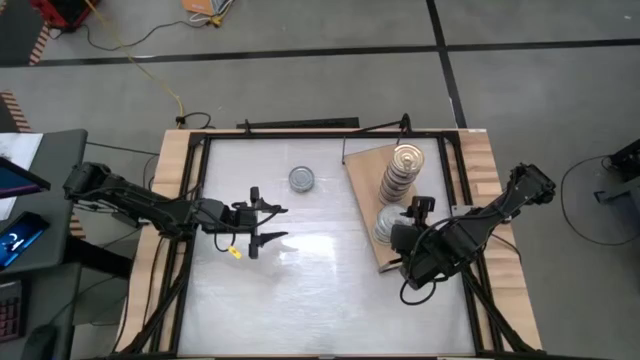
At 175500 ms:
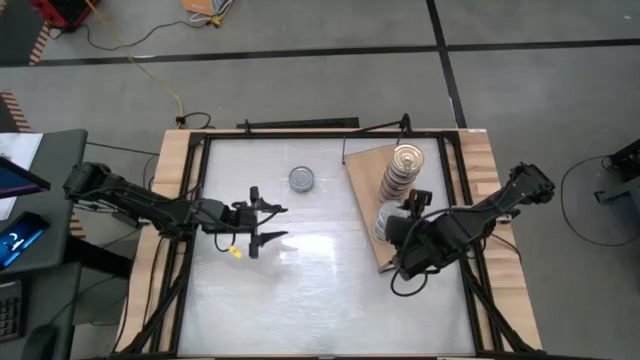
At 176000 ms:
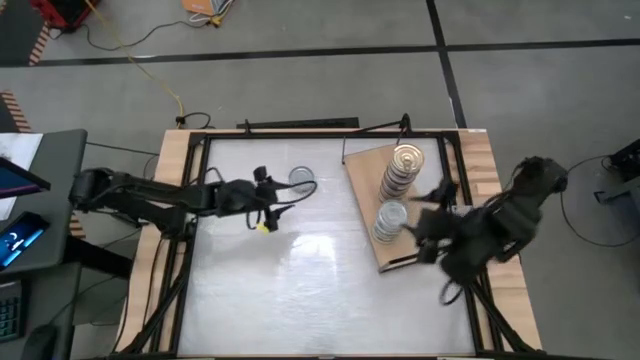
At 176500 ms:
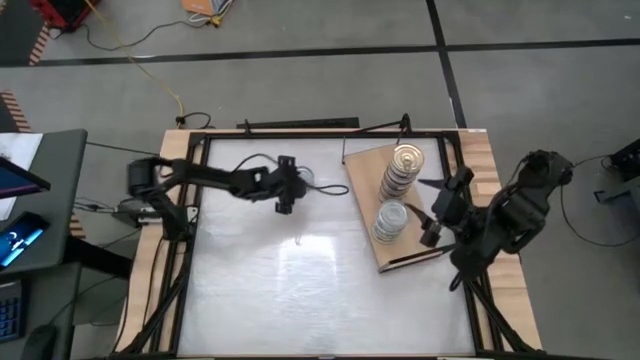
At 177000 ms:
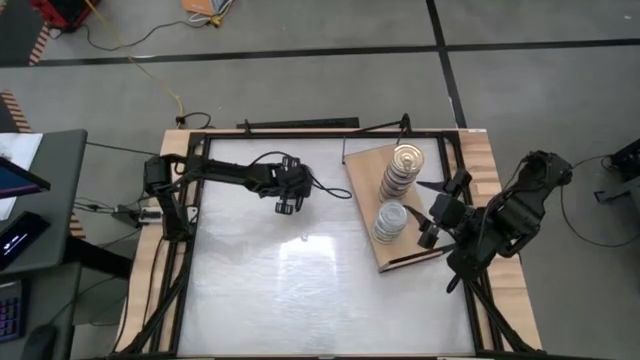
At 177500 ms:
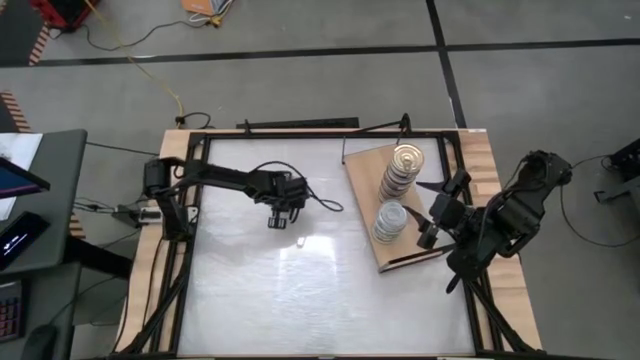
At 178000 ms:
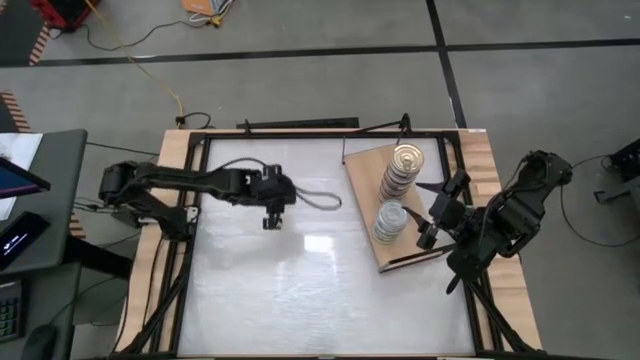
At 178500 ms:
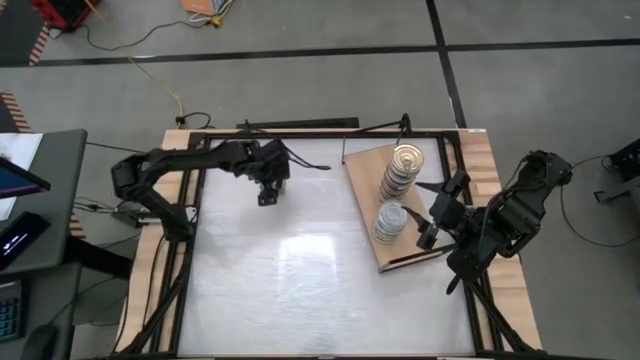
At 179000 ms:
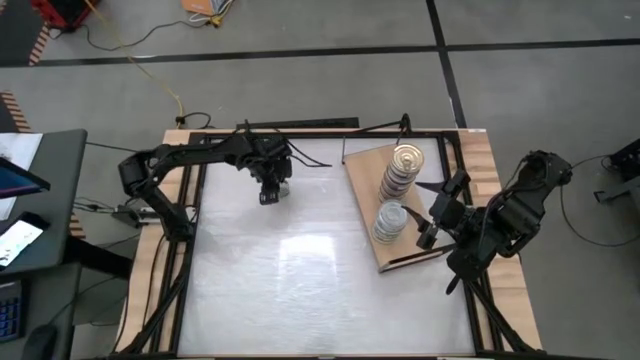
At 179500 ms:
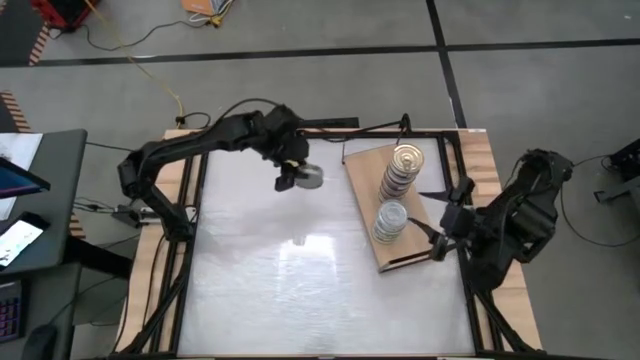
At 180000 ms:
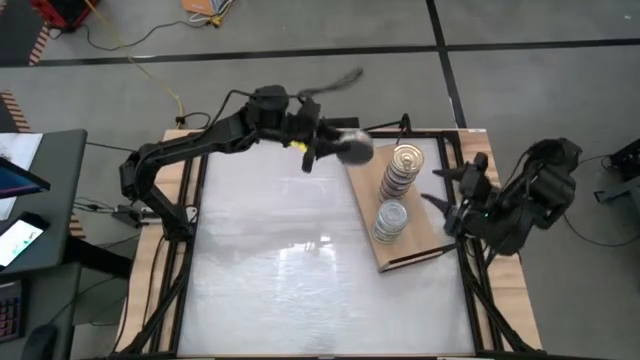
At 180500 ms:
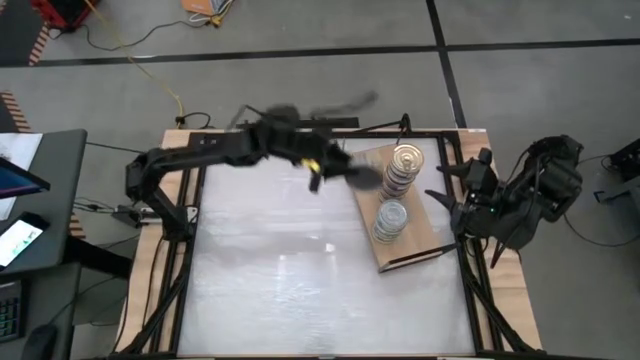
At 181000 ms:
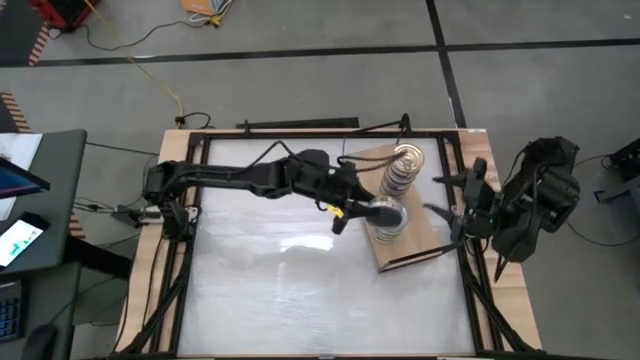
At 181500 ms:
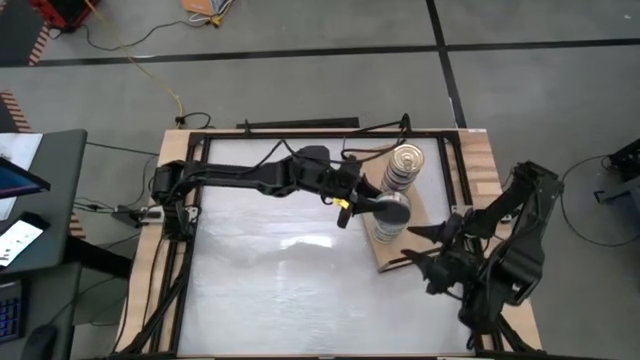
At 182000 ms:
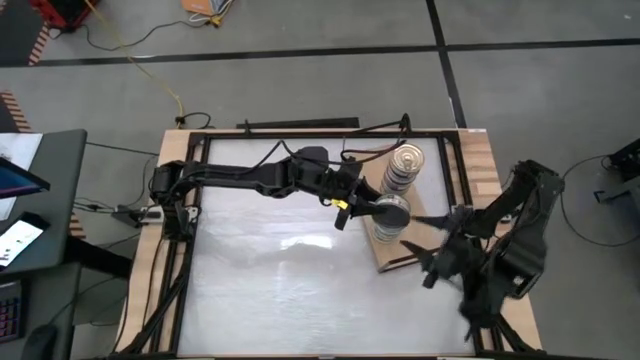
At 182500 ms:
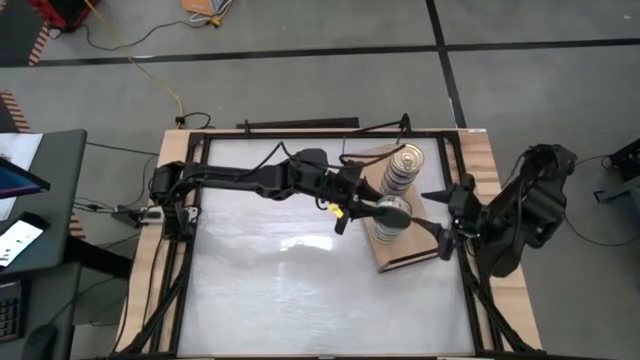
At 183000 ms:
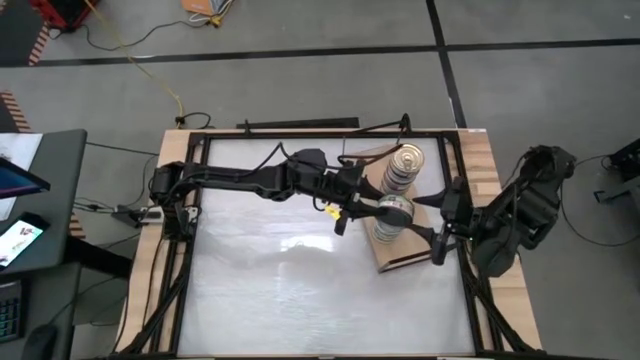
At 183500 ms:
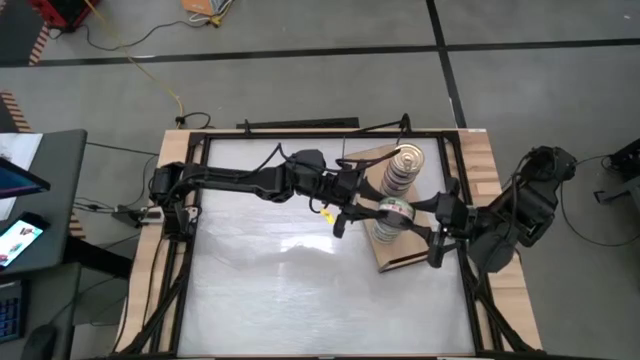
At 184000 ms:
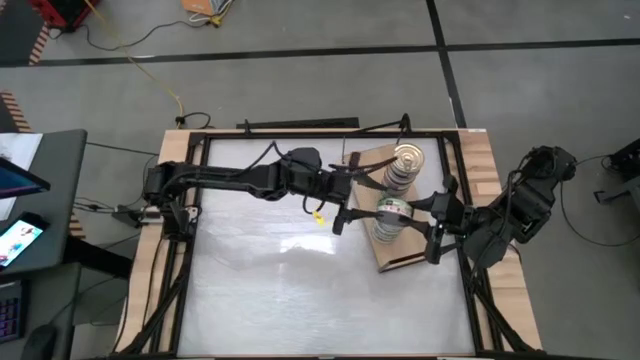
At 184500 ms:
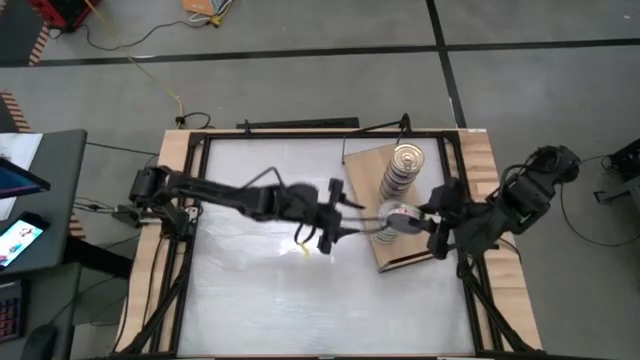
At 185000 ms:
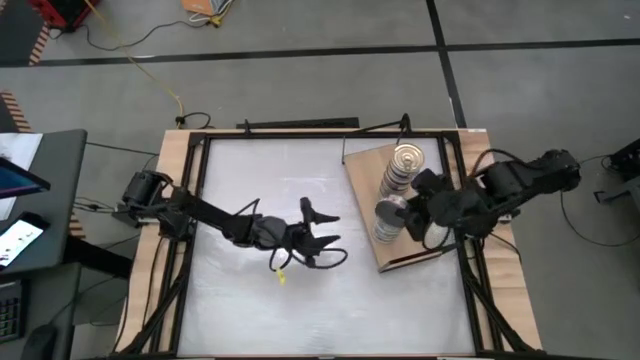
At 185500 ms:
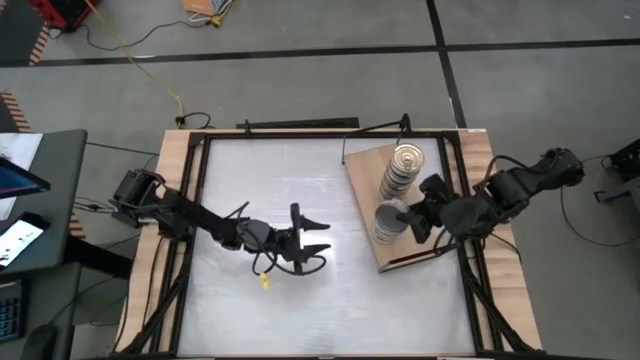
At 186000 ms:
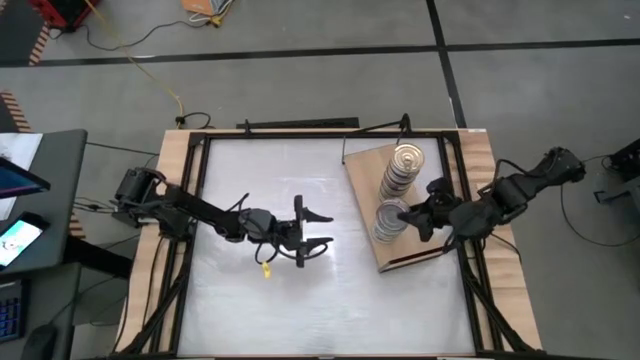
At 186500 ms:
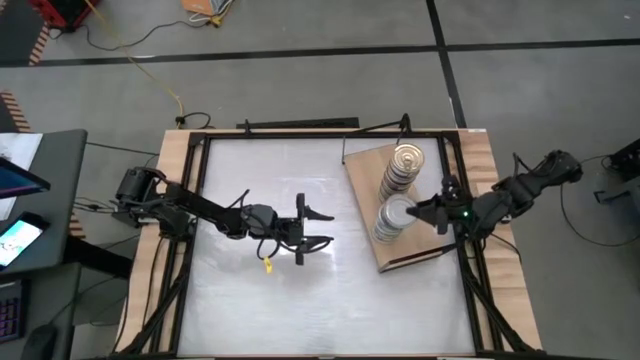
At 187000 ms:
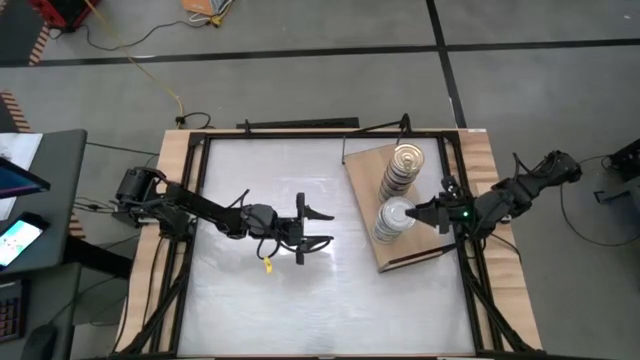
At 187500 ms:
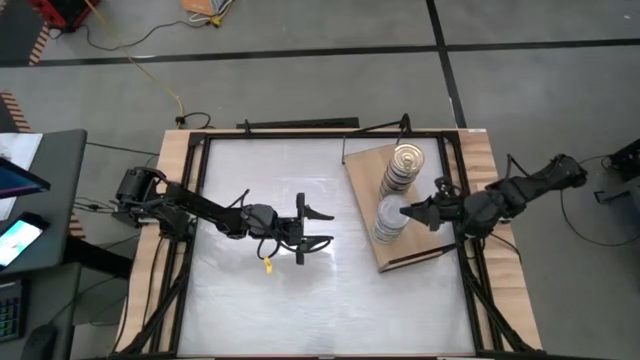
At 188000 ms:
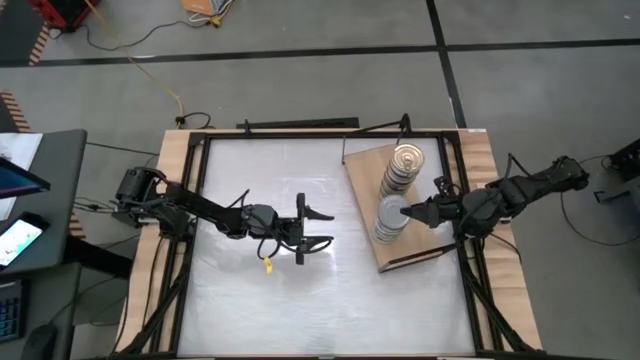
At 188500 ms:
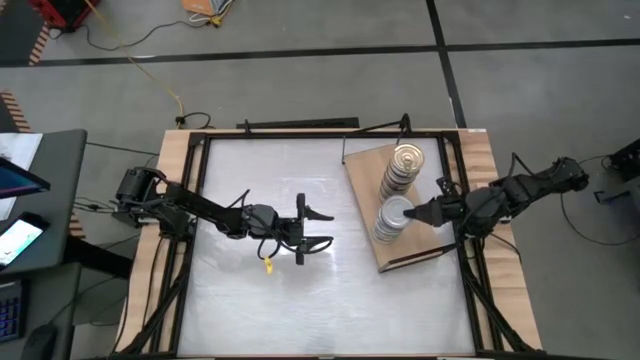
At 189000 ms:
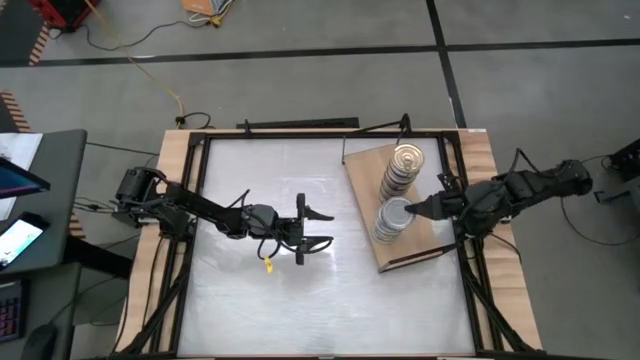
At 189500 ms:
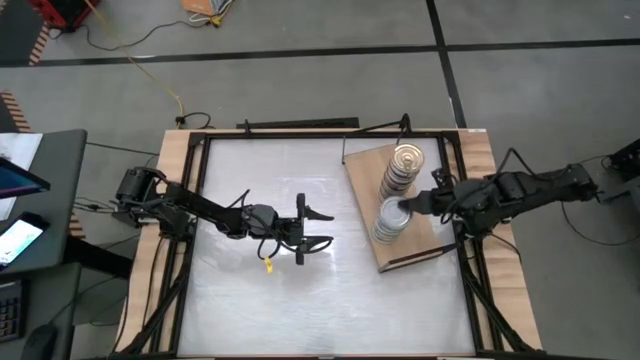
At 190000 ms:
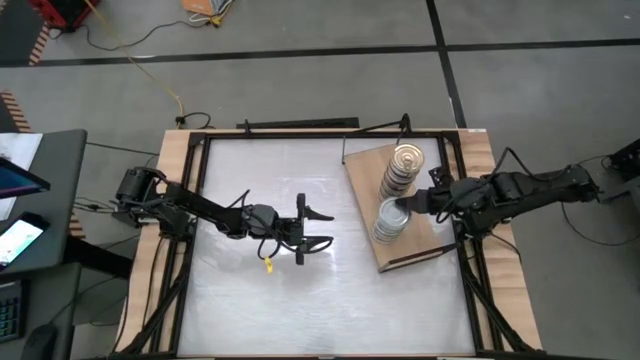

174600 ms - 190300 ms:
Task: Stack canned seafood by type on shelf
Stack the green tuna can on the green tuna can on the shelf

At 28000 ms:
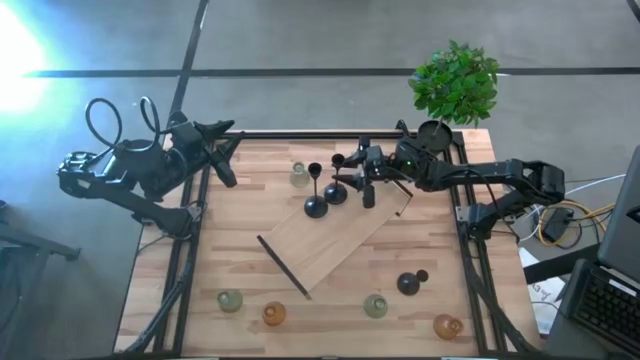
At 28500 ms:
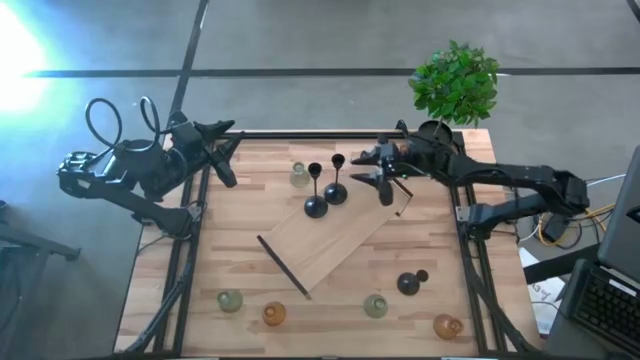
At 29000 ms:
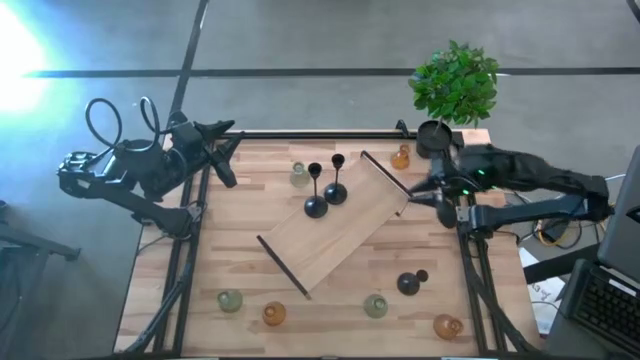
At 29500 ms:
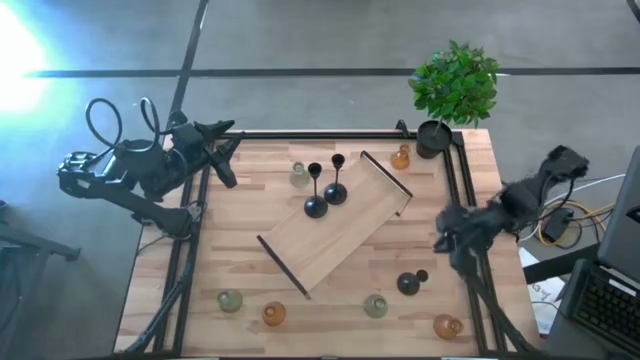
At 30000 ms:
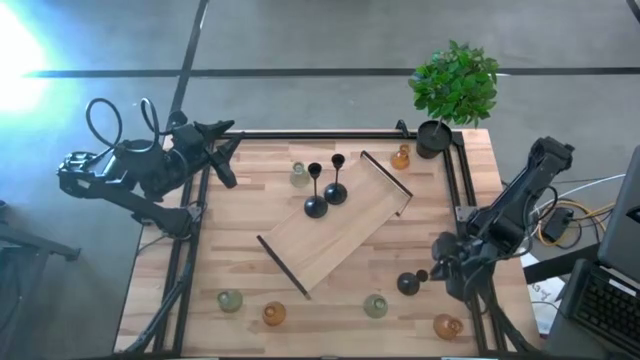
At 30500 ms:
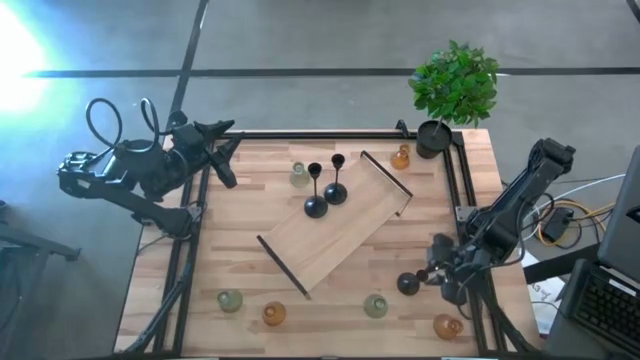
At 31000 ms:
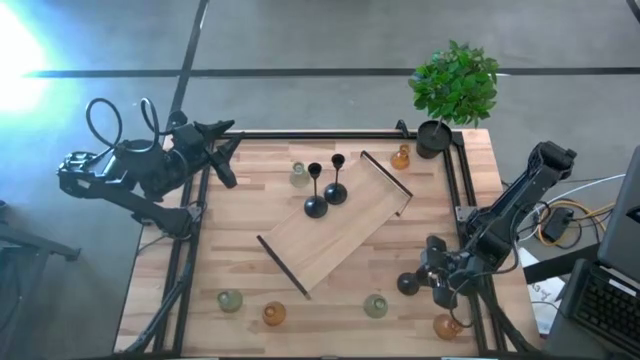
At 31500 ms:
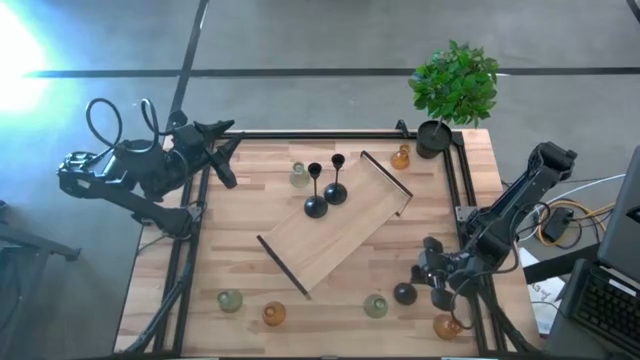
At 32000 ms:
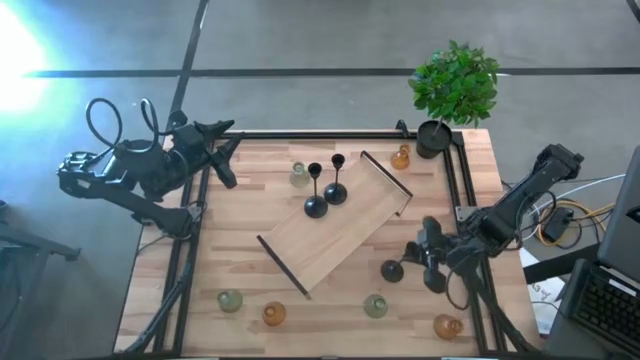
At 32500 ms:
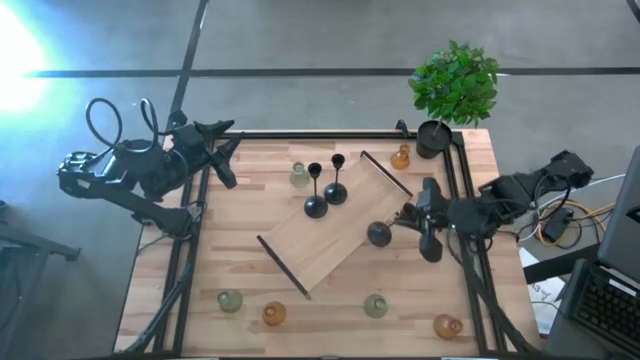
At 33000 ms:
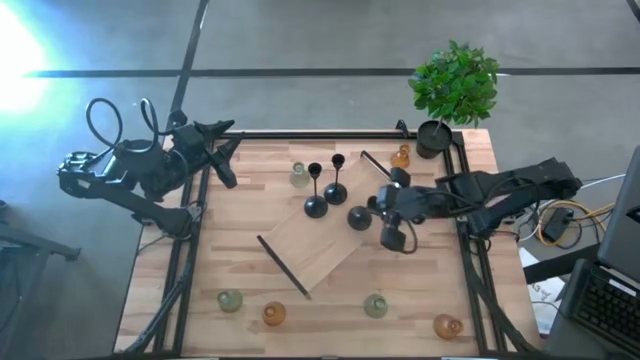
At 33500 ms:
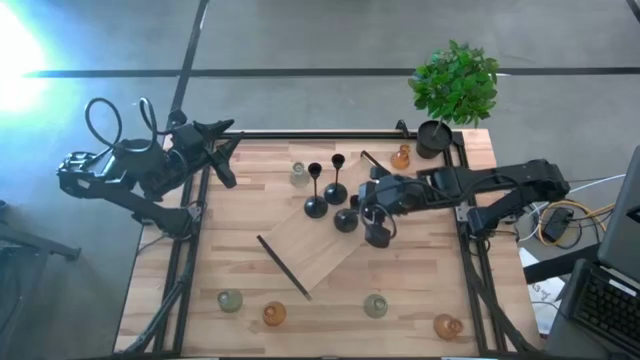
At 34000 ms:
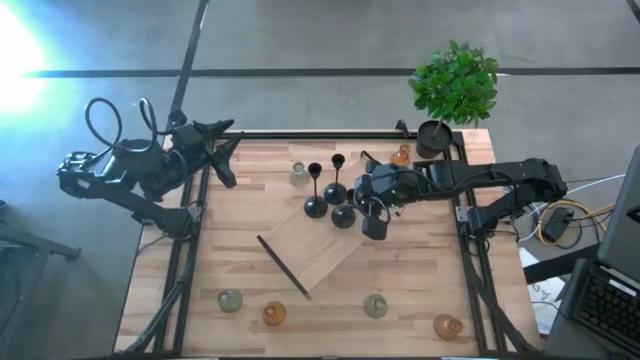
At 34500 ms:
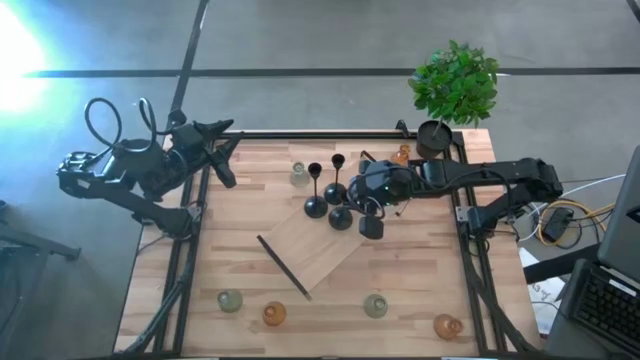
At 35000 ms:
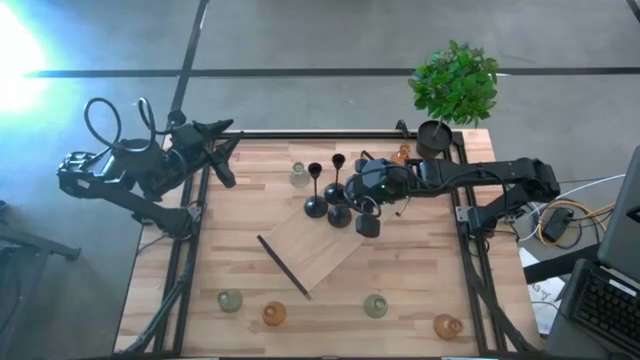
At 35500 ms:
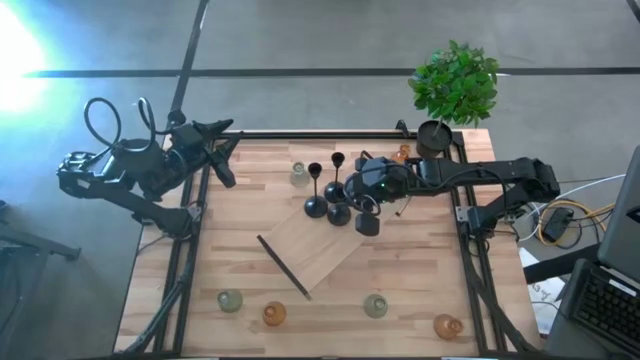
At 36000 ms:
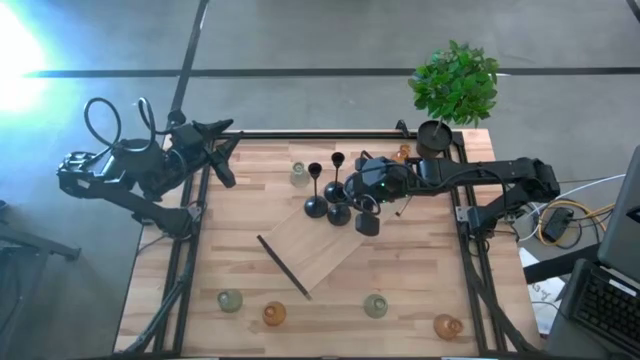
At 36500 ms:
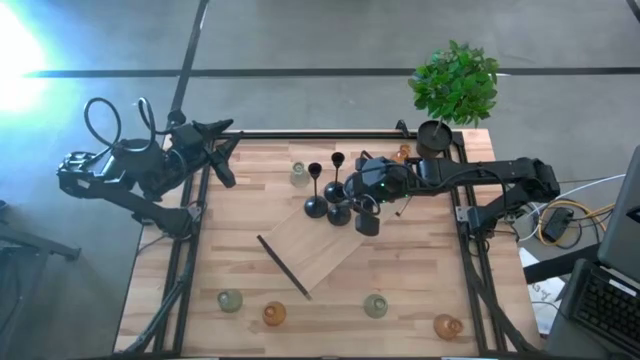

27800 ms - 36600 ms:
Task: Pick & Place candle stick holders
Put the black candle holder on the shelf
